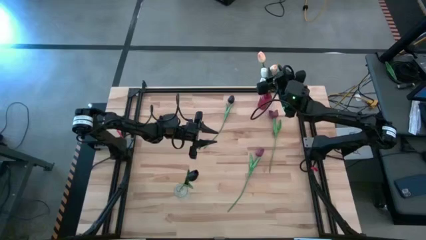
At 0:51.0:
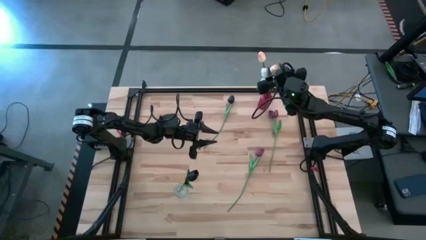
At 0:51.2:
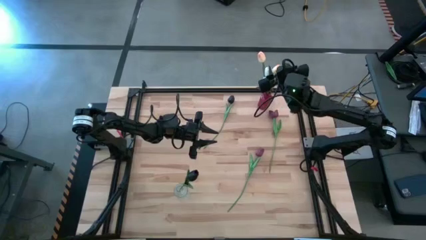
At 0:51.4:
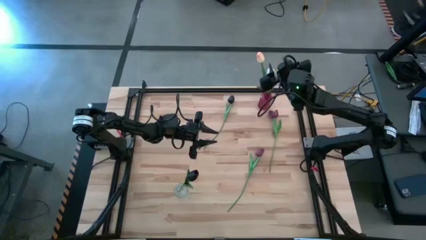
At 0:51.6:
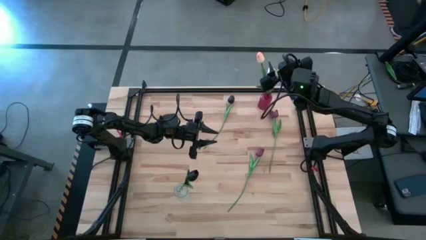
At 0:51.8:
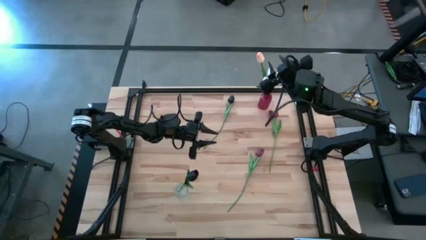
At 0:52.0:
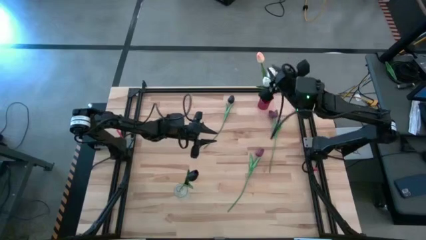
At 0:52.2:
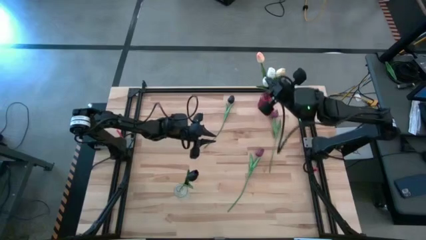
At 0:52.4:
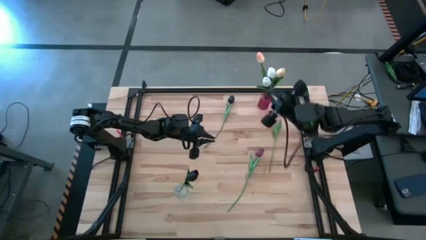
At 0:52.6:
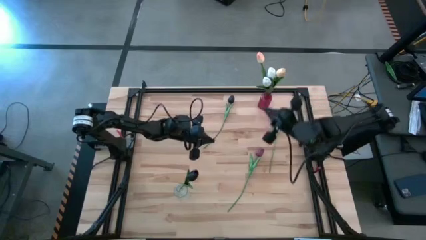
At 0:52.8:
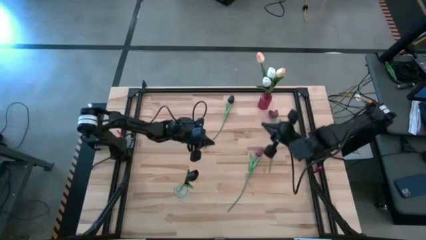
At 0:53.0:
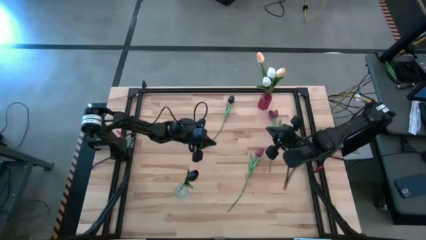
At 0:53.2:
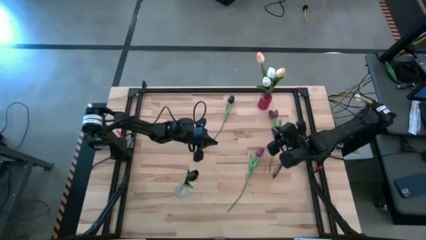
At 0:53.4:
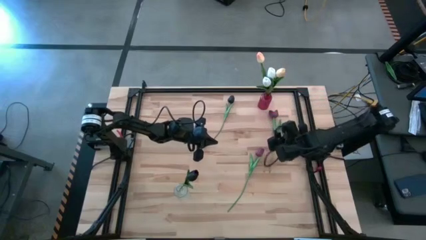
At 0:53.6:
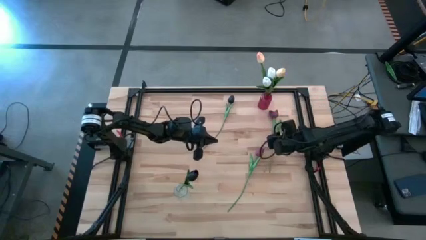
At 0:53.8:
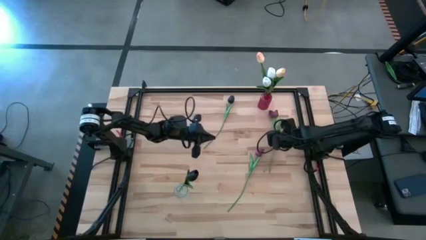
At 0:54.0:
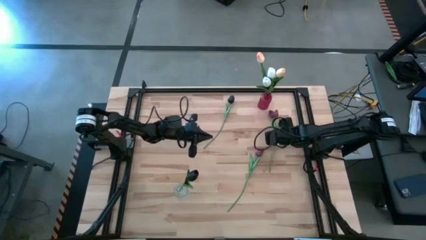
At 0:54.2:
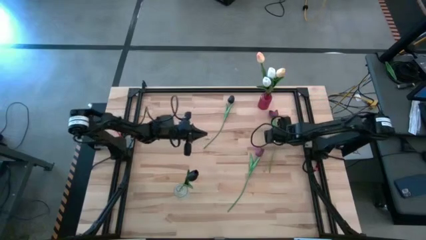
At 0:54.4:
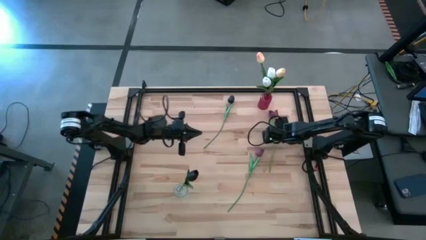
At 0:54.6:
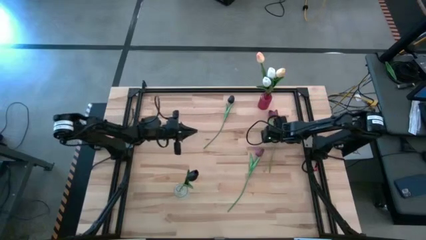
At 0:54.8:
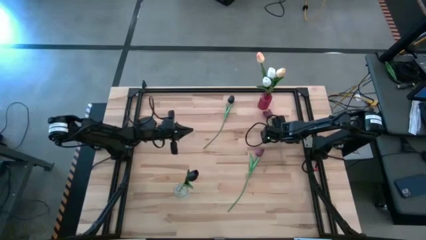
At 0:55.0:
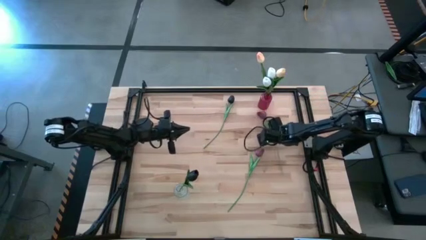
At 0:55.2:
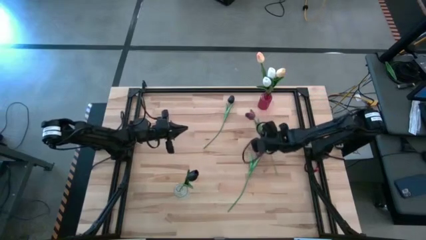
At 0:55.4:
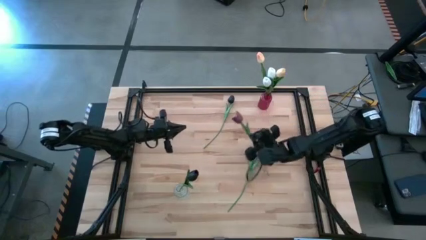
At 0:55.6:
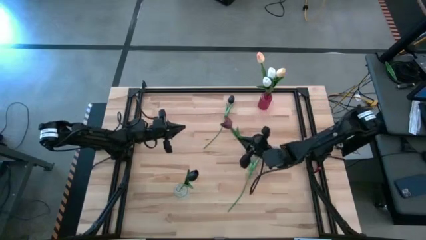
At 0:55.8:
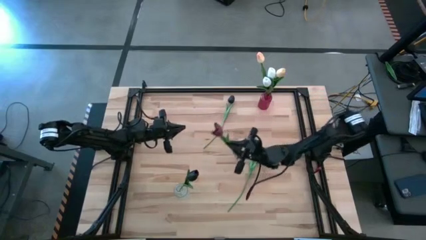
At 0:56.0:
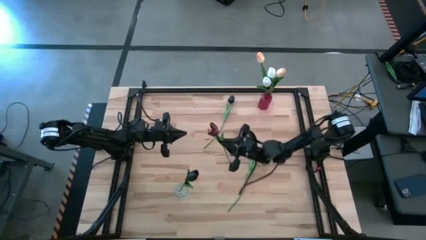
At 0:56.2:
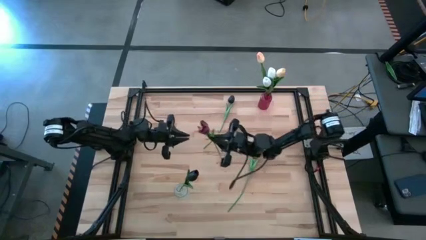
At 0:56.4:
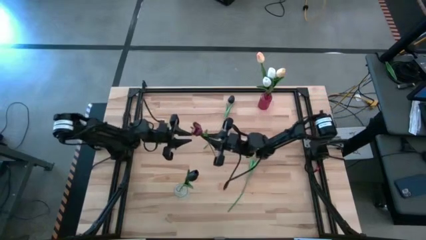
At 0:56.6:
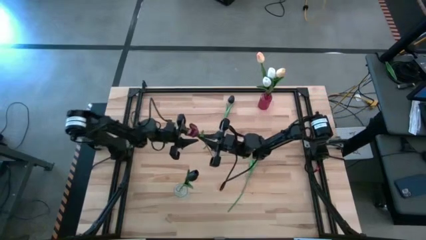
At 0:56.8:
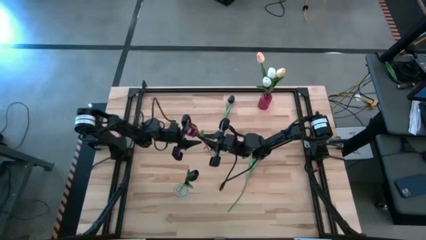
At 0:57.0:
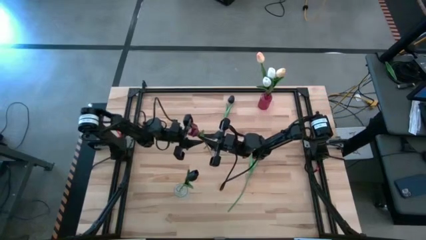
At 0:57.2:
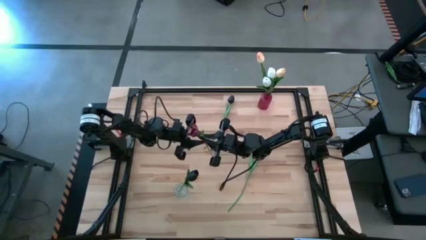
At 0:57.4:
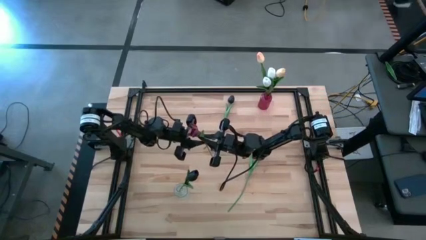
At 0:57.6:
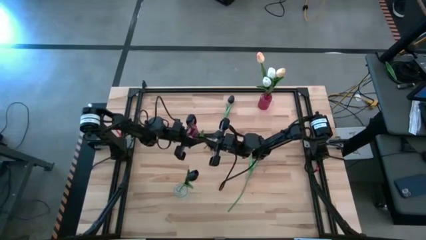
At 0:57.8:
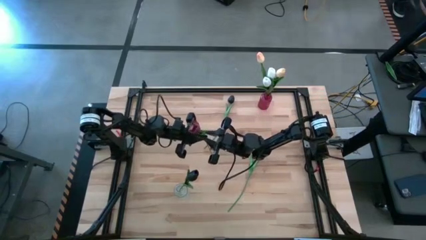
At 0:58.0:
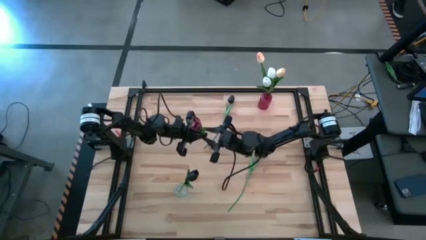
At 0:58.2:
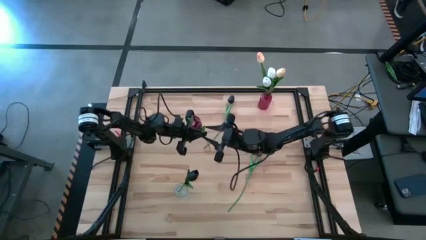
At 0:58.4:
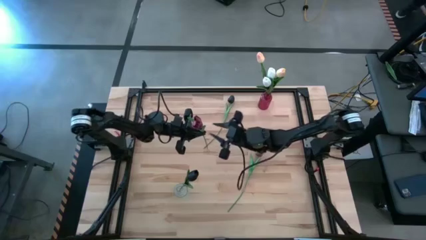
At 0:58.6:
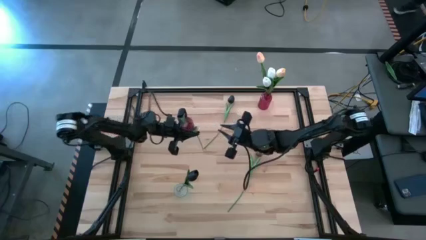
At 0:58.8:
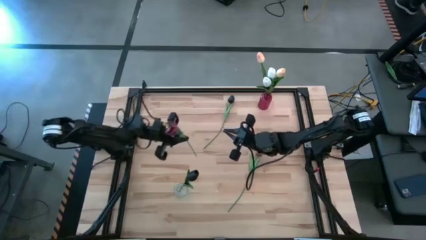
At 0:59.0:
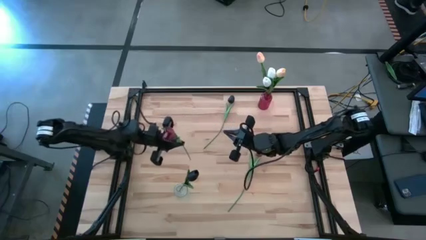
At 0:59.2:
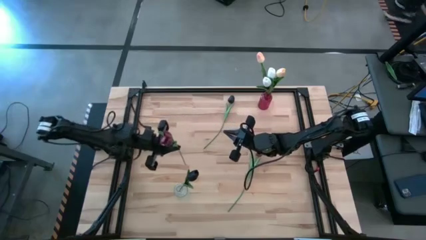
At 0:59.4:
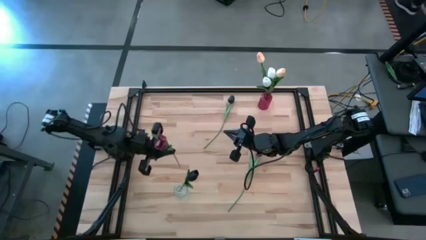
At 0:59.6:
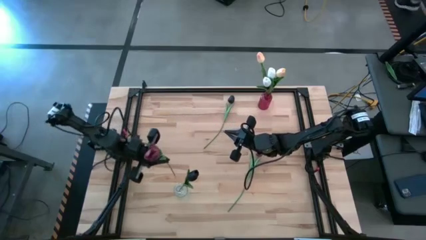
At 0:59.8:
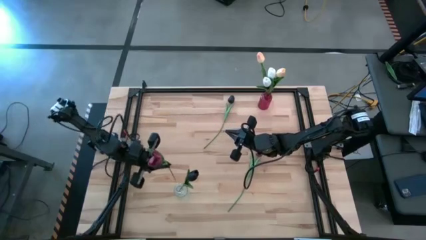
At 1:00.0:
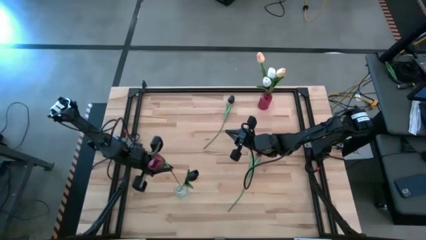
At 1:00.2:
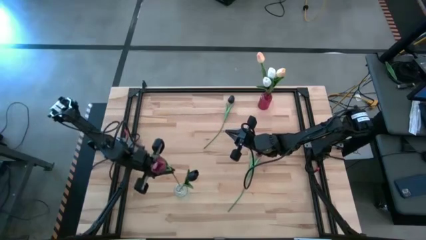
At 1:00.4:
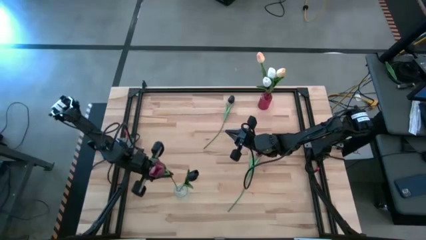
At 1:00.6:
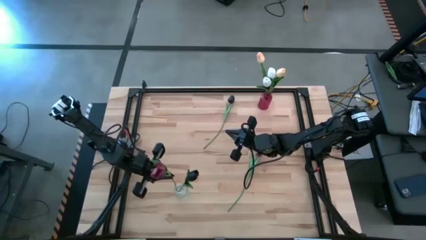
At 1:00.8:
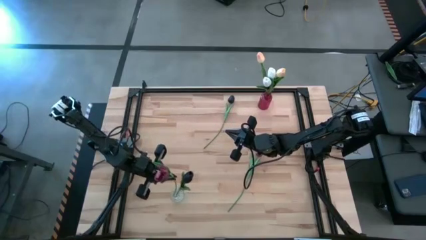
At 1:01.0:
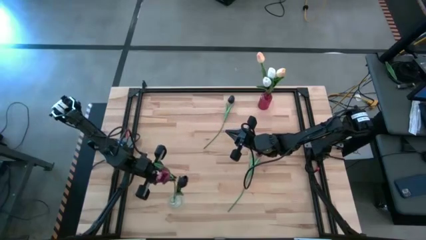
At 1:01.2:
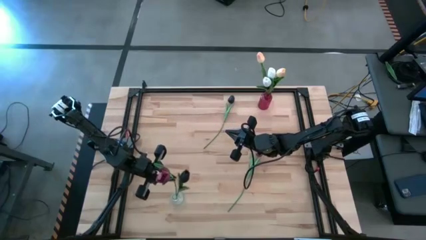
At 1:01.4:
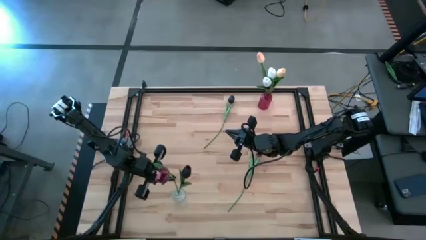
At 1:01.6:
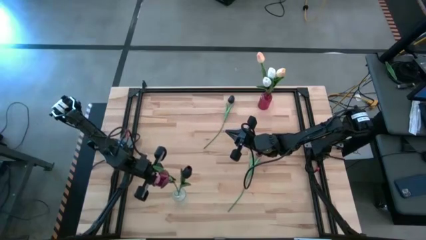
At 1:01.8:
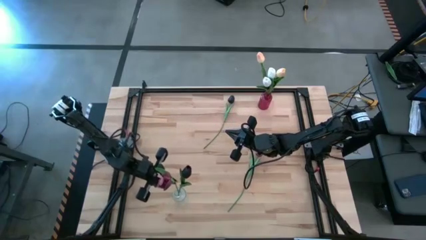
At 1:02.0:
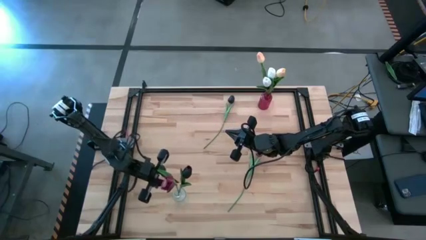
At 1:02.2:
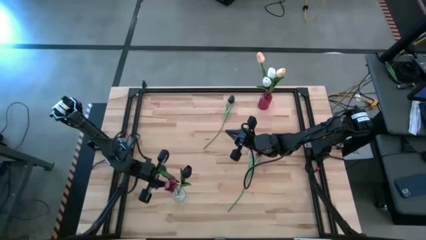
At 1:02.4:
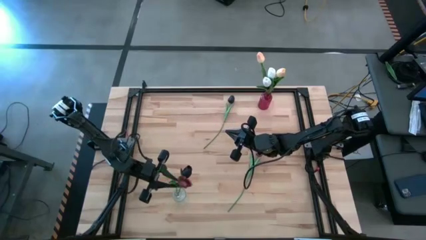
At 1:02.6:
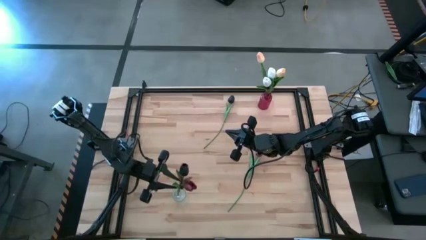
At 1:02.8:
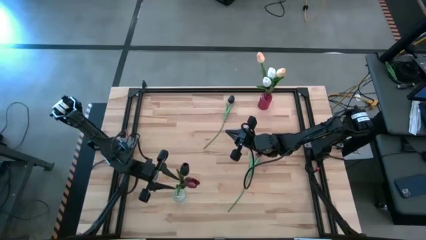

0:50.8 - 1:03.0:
Task: Sort flowers into vase by color
Put the top red flower into the transparent vase
